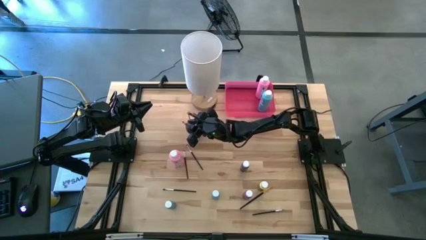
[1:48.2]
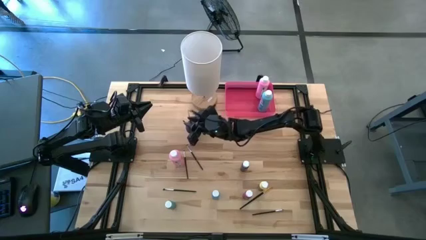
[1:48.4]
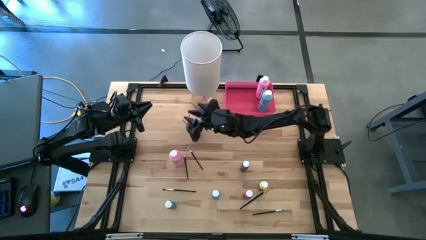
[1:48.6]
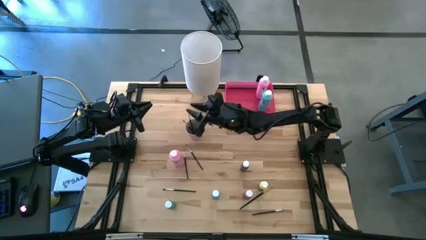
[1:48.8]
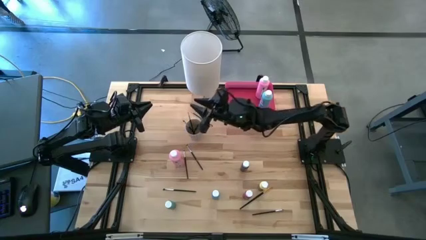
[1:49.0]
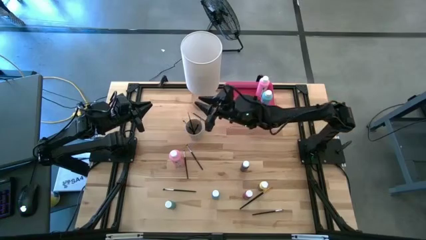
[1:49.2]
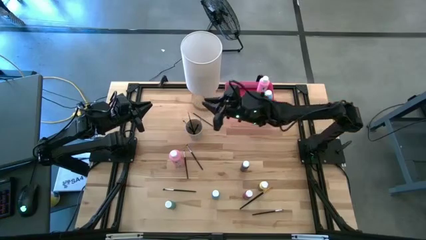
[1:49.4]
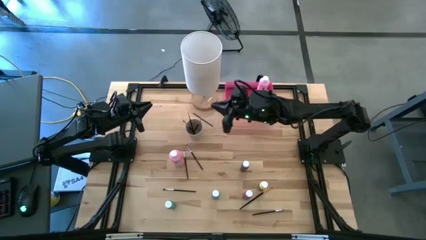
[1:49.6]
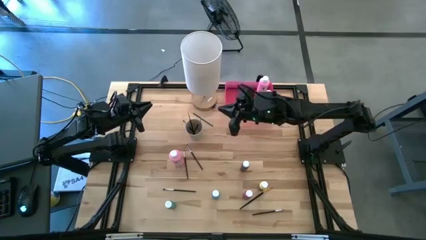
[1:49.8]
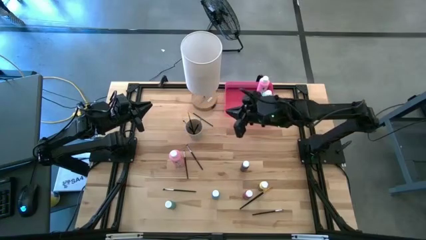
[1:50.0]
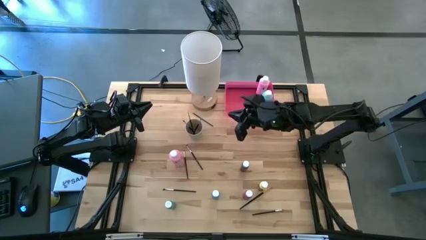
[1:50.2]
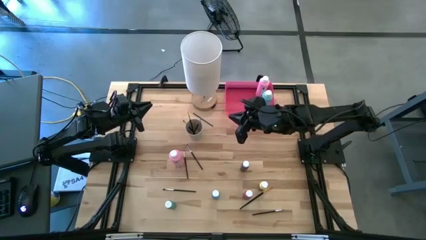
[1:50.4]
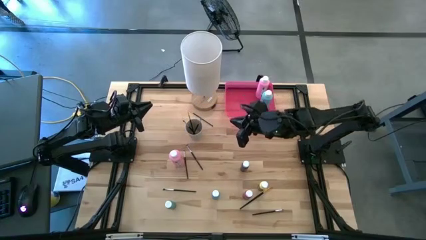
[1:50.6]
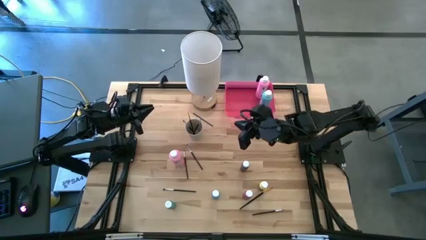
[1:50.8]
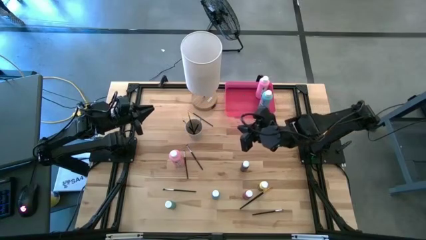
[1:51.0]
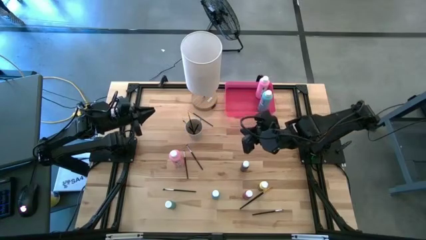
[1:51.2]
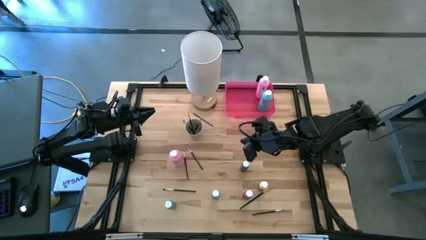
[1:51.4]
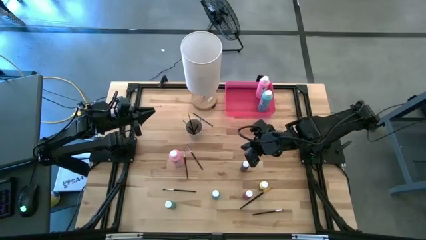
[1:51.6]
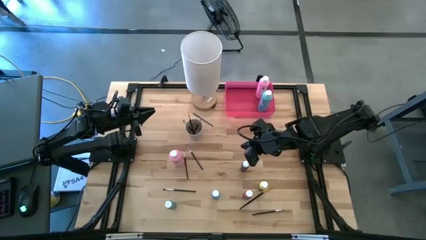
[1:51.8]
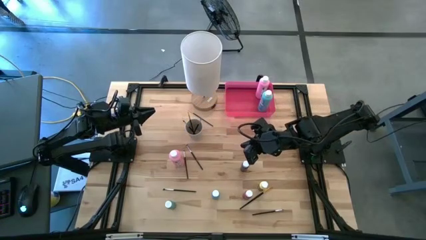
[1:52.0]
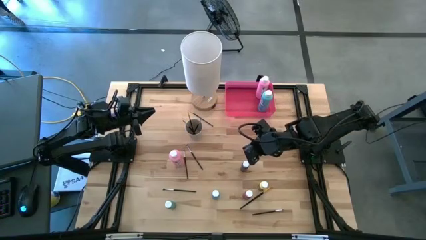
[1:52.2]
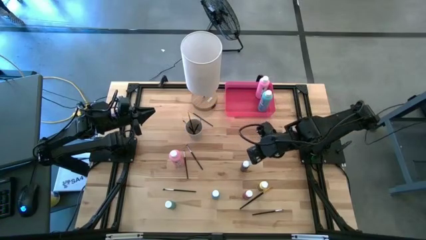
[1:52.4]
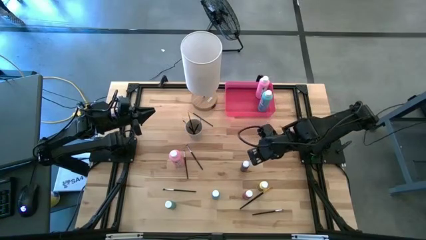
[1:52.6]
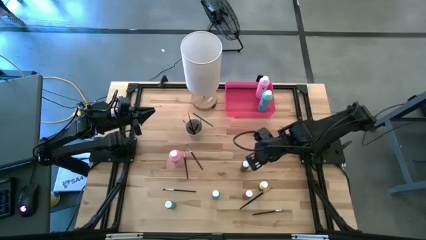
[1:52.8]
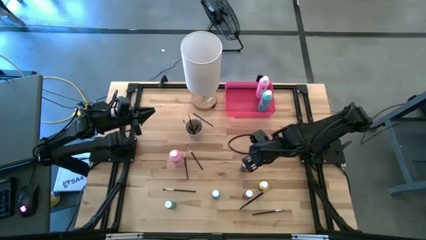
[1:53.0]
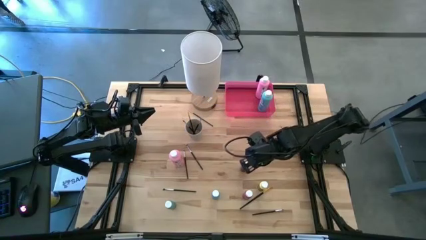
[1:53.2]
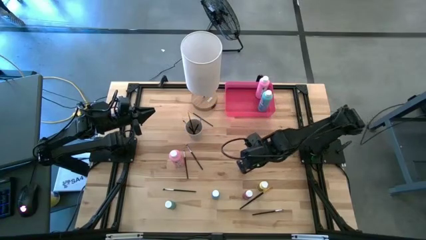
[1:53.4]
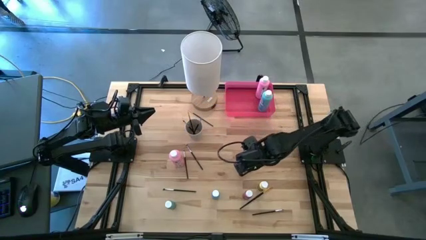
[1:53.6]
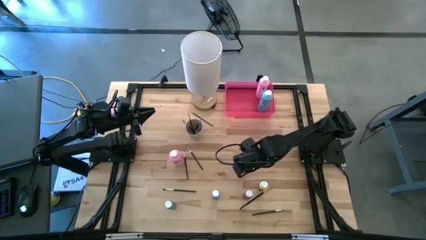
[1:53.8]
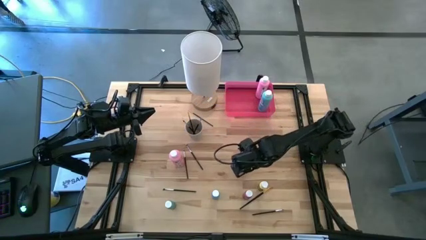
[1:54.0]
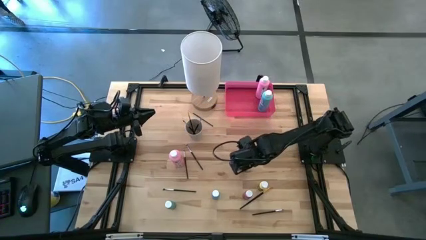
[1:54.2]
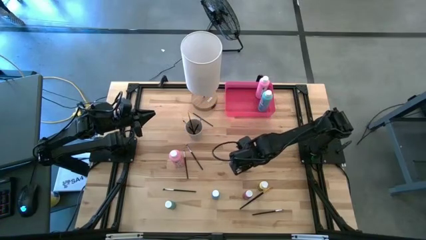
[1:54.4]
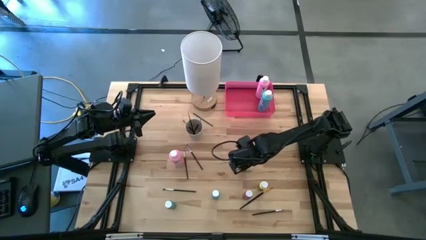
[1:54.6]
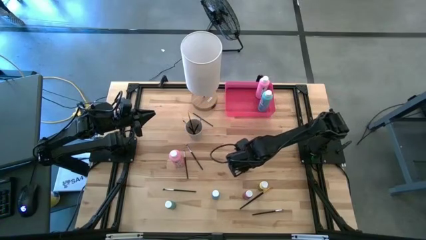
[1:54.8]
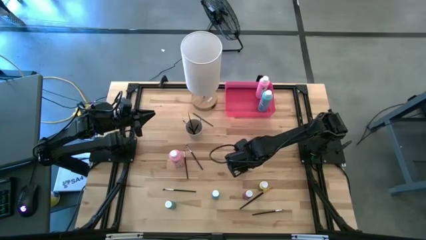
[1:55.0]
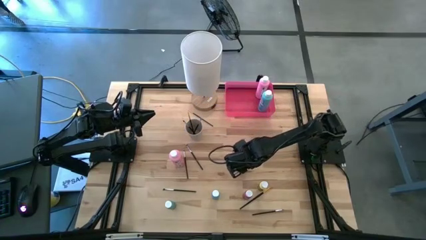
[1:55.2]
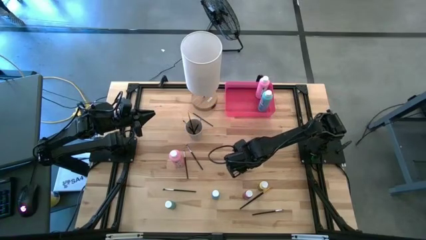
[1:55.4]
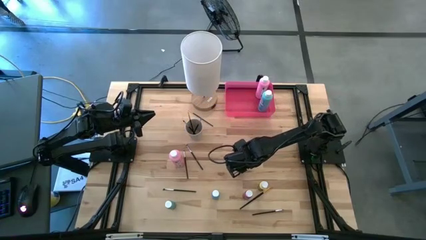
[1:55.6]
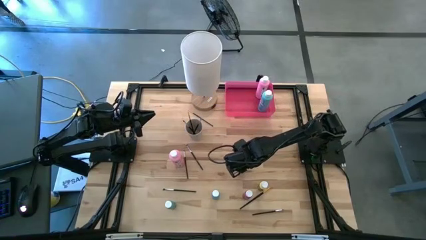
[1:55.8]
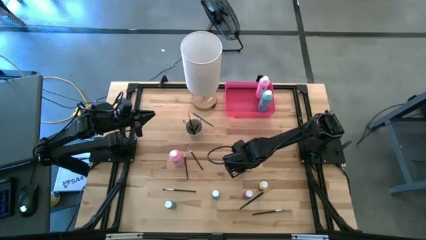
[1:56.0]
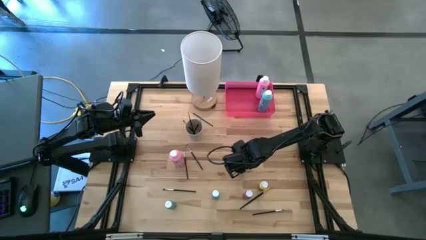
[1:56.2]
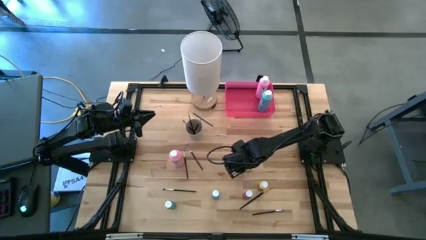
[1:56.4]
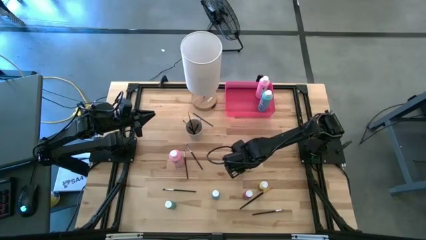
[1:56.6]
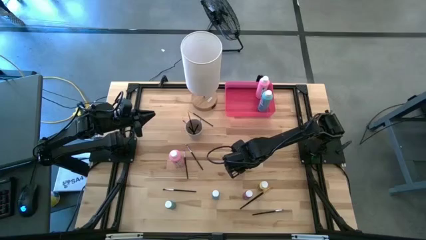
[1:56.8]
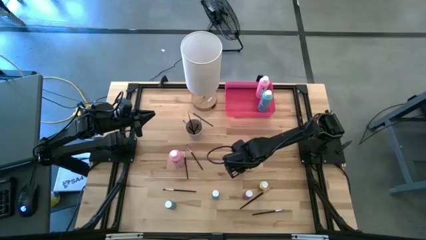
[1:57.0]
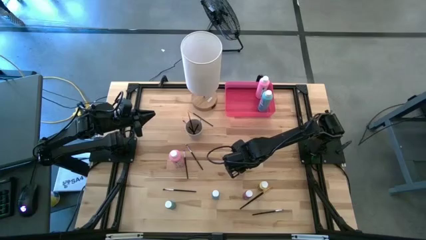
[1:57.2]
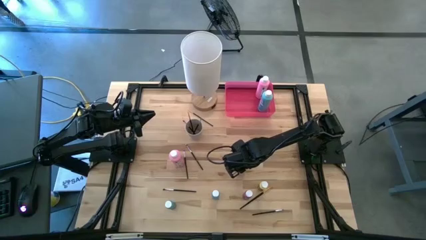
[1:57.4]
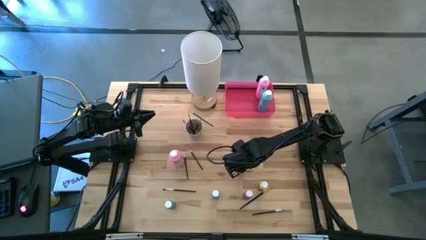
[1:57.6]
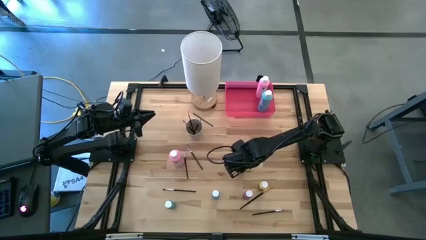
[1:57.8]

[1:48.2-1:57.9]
Task: Pick & Place Paint Supplies
Put the small blue paint bottle into the pink bin

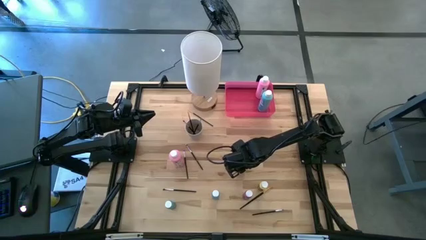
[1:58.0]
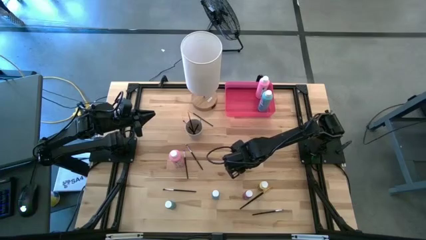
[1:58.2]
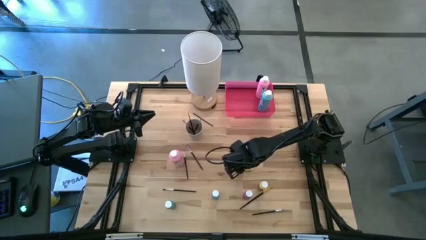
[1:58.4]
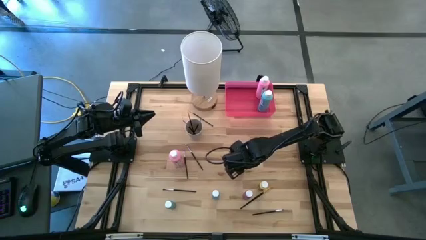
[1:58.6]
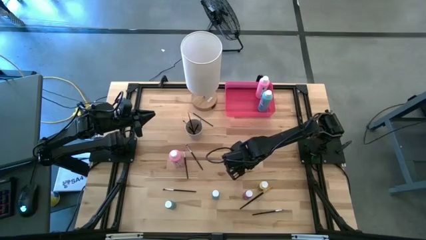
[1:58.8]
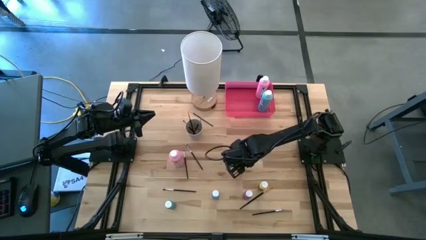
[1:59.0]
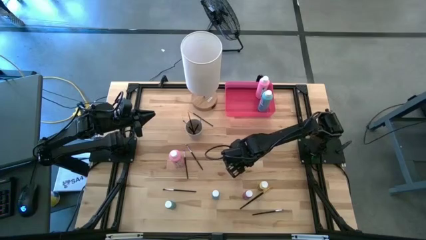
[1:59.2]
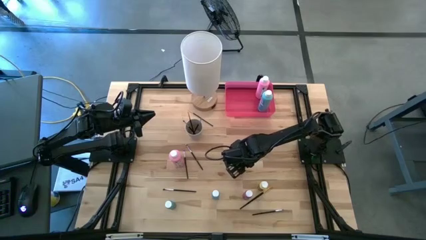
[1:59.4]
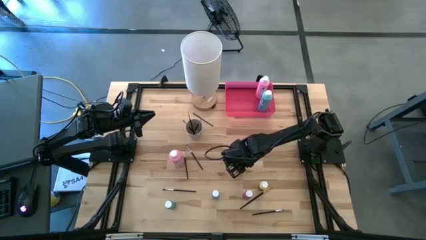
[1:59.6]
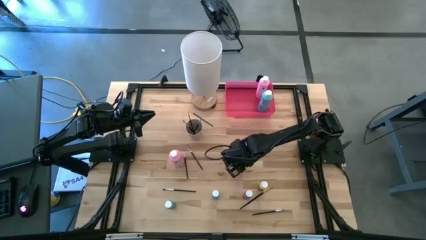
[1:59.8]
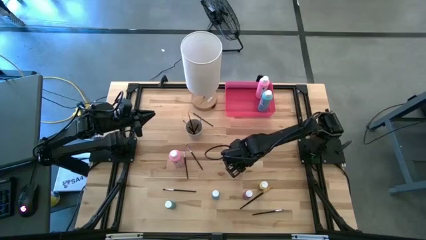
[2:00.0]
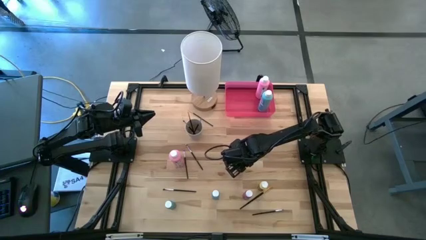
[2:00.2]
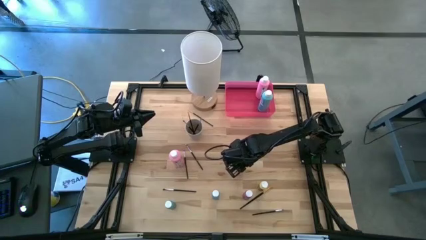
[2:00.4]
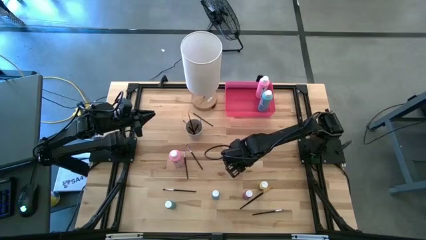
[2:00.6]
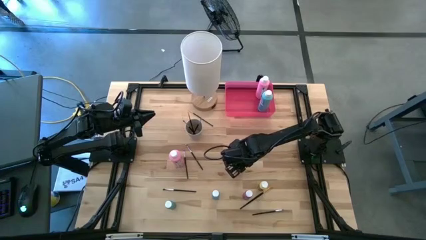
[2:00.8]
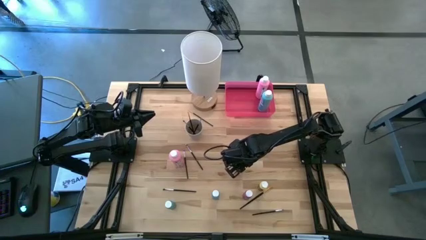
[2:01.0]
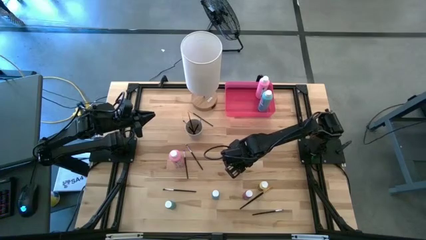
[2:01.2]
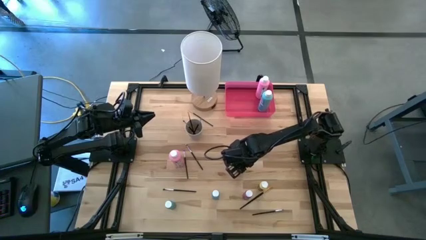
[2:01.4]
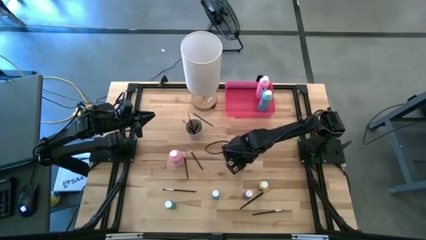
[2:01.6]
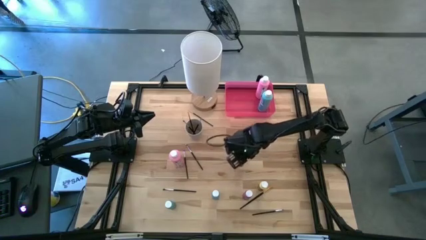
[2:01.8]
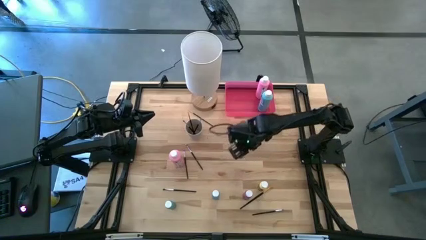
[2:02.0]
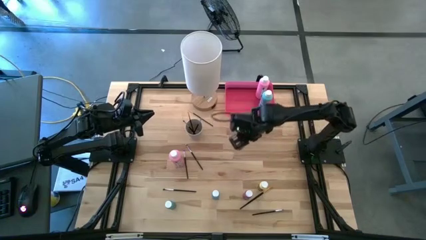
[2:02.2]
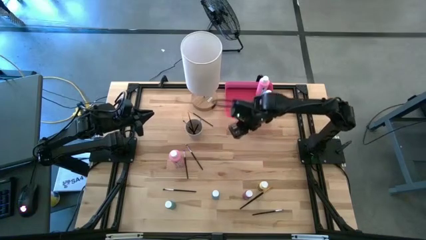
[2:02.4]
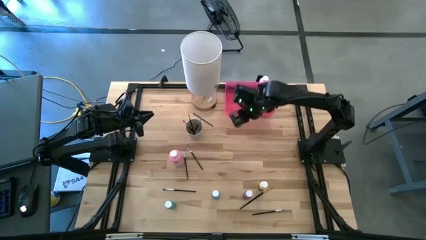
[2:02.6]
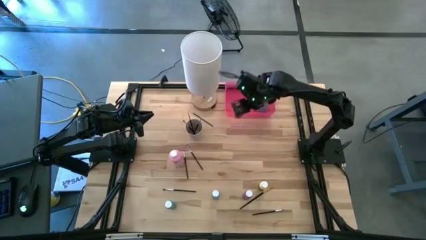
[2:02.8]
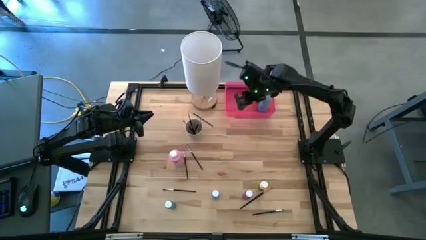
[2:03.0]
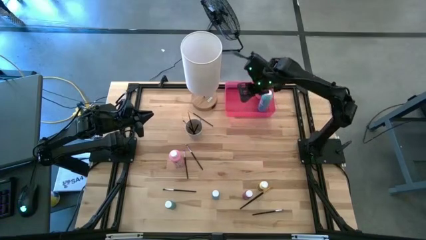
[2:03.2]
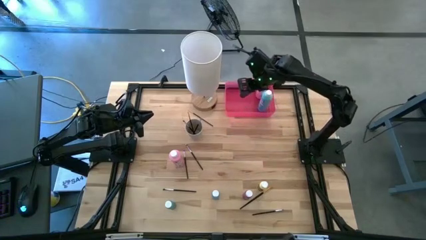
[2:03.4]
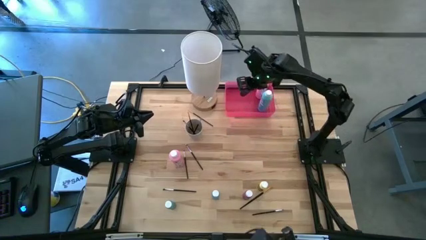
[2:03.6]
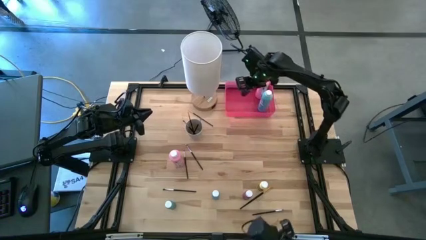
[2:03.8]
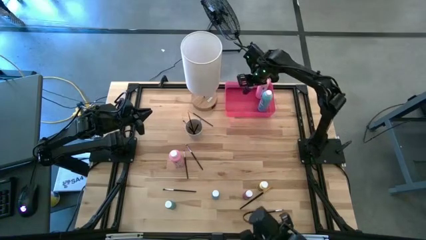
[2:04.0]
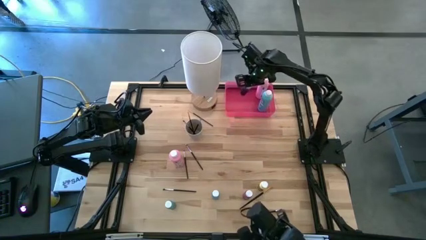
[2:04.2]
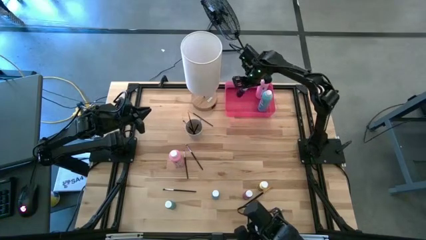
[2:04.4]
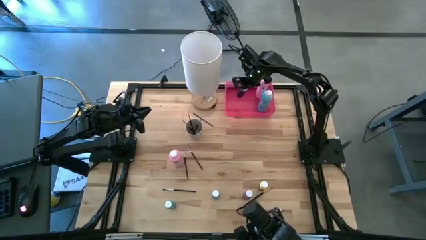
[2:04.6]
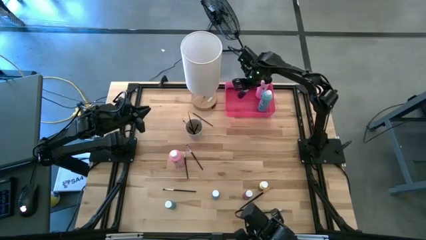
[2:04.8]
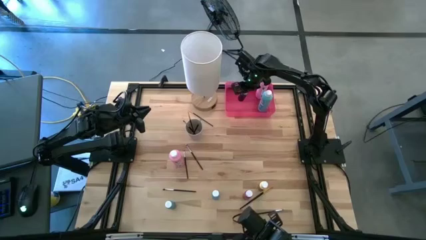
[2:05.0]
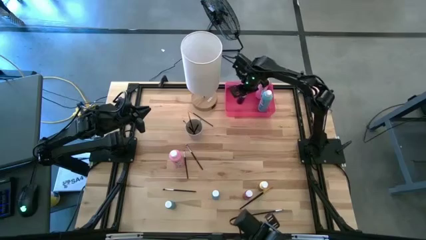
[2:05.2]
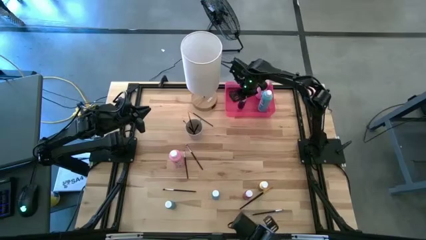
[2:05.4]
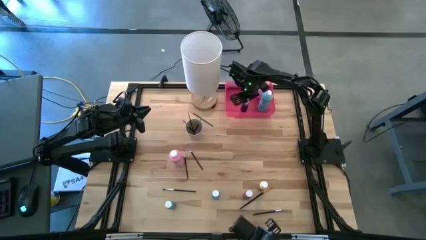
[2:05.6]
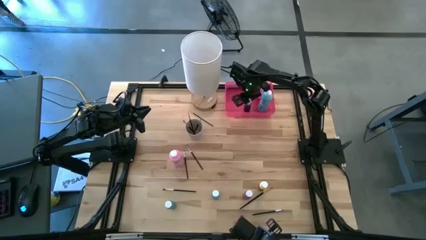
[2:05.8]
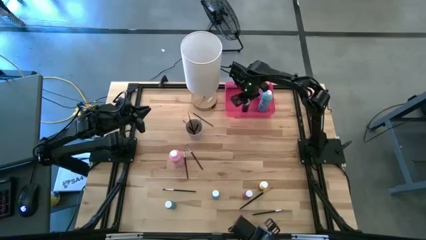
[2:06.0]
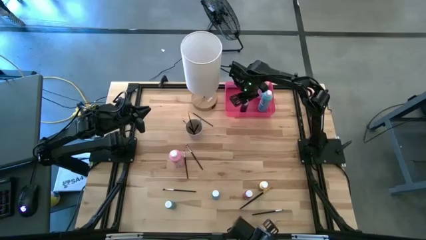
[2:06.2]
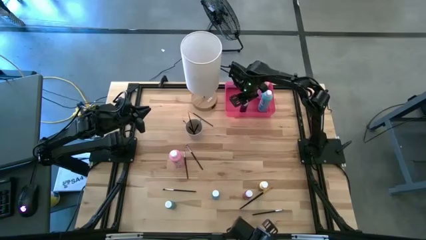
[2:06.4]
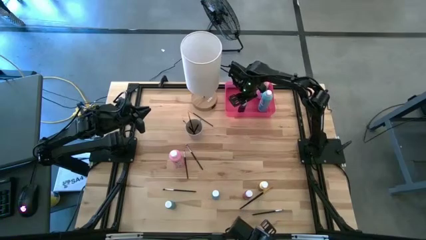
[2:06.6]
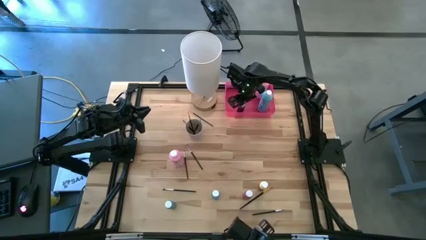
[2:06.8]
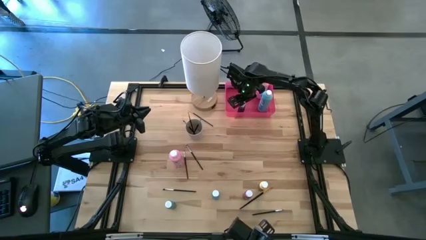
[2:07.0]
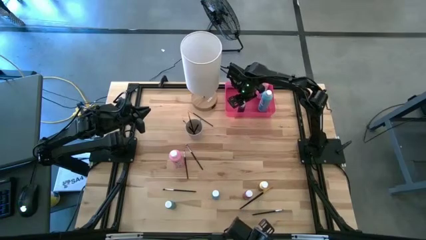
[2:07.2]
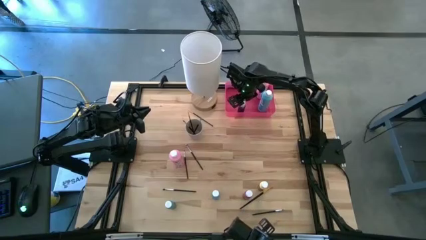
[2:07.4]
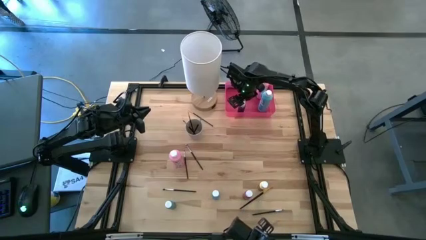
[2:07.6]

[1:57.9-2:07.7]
Put the small blue paint bottle into the pink bin
